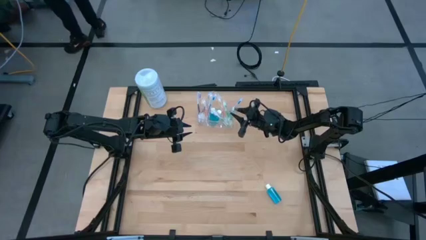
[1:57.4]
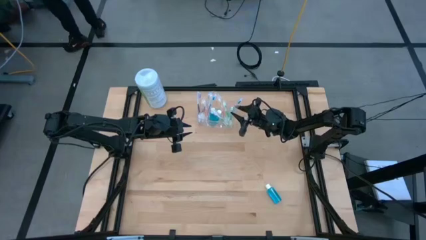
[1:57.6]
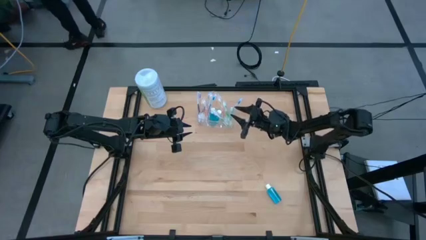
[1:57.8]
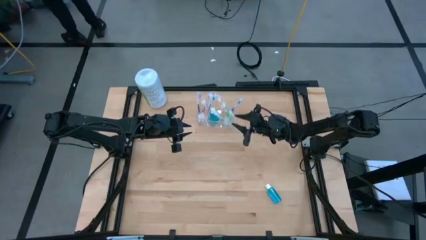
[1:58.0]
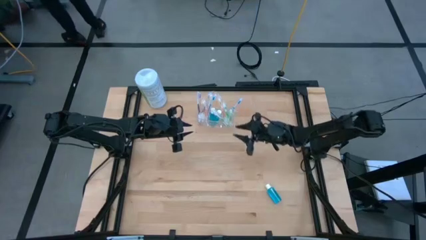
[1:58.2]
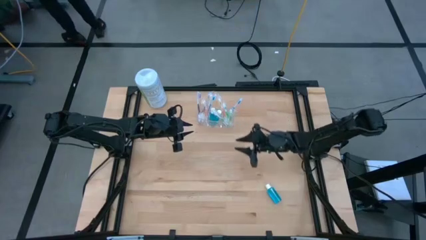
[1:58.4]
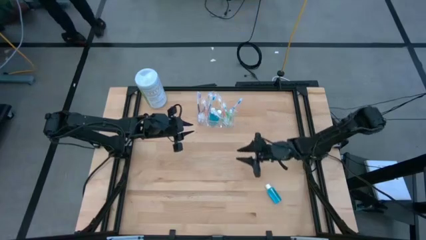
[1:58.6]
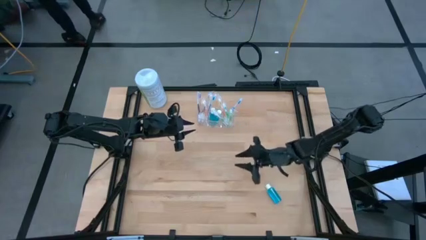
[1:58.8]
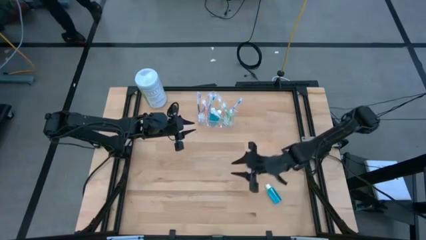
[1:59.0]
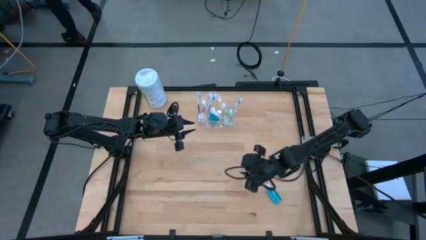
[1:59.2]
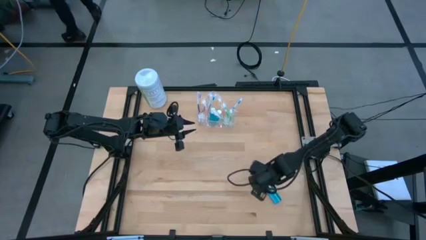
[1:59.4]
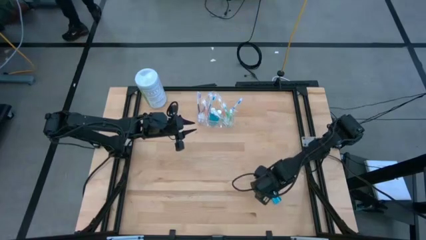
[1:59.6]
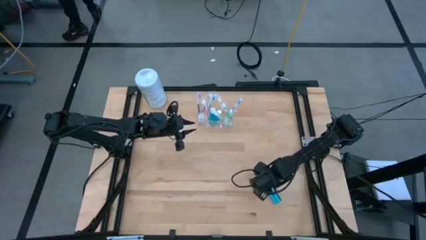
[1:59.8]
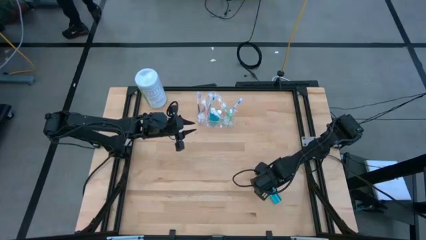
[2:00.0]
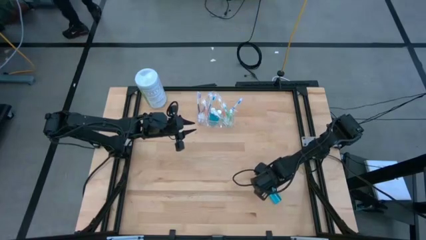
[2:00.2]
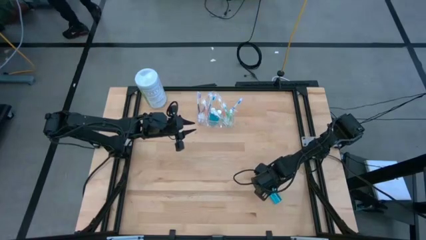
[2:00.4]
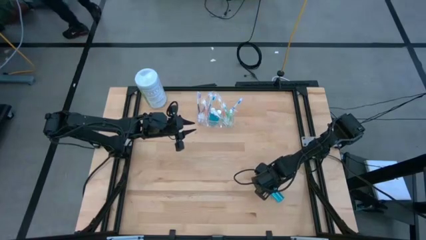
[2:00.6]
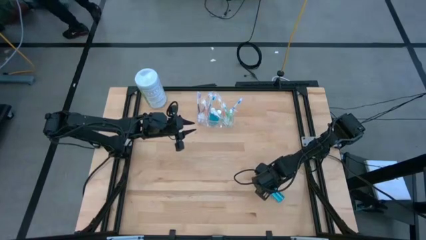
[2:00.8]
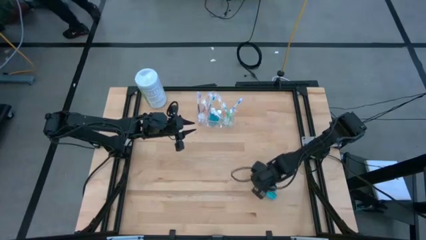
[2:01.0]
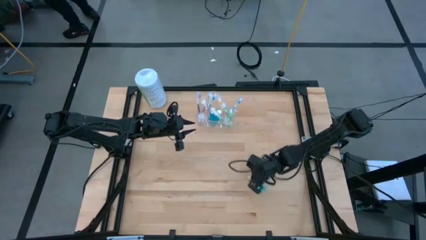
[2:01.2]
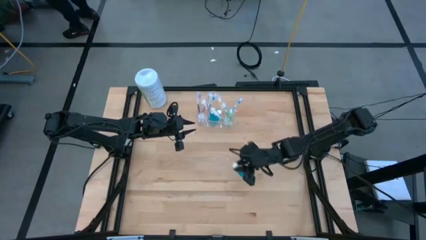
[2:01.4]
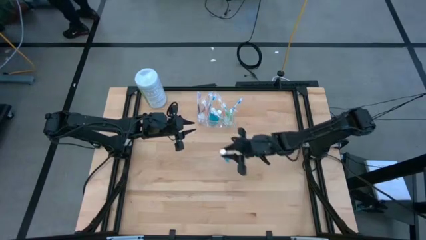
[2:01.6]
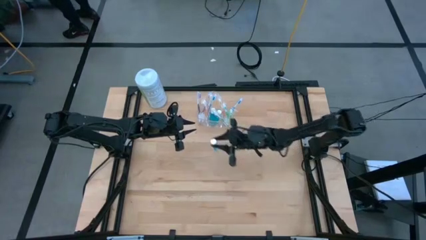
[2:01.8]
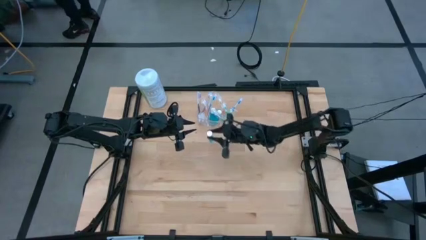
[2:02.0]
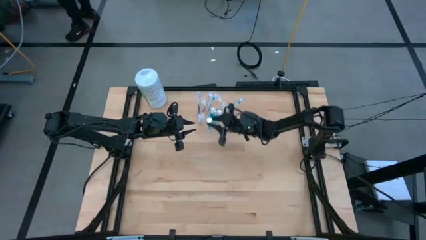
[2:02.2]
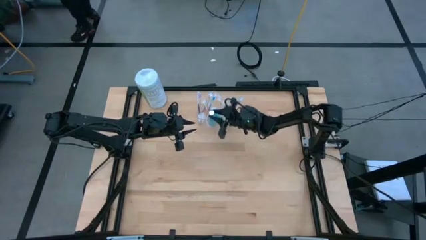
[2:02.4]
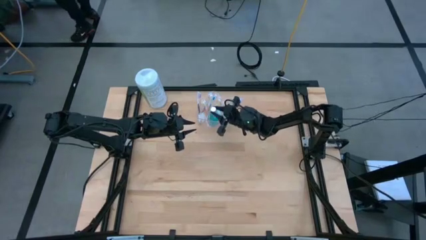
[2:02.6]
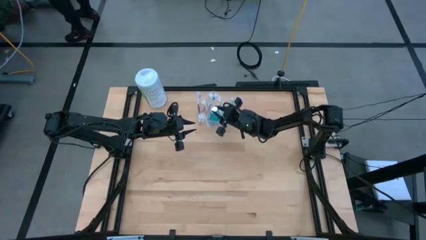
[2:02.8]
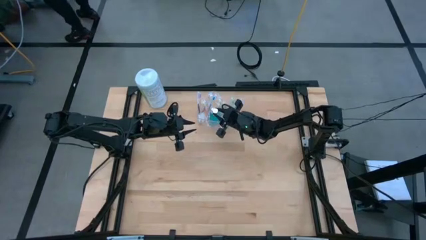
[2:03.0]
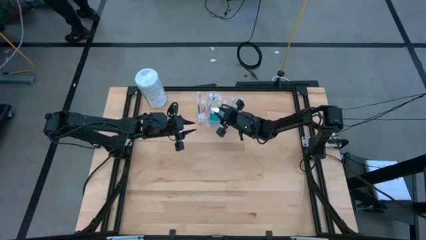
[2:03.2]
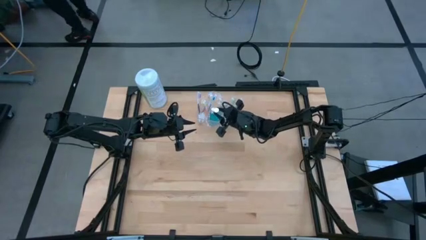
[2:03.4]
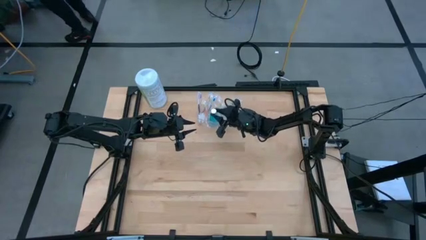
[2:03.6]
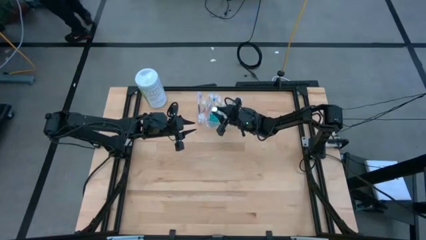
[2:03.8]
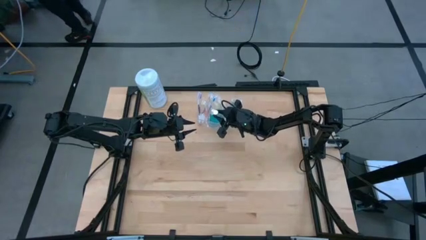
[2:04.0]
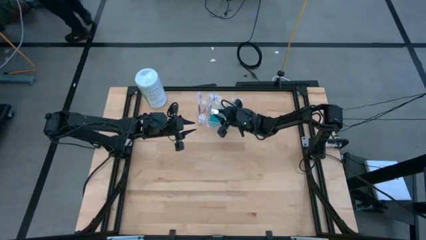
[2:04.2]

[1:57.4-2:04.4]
Task: Pick & Place toothbrushing station
Put the blue mouthwash bottle into the transparent organizer

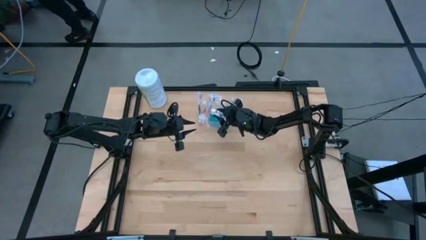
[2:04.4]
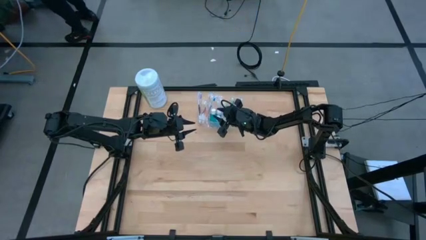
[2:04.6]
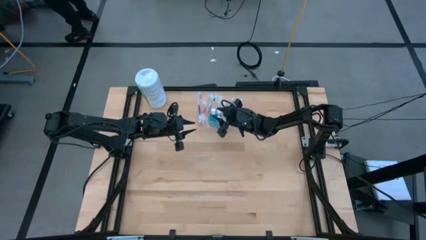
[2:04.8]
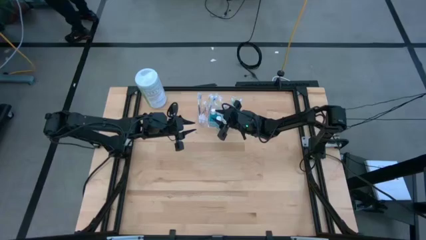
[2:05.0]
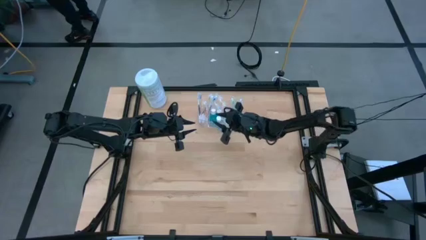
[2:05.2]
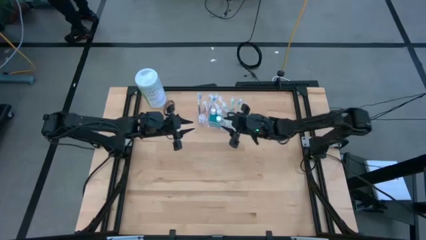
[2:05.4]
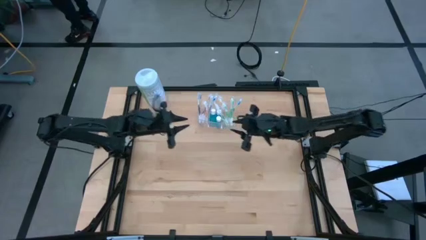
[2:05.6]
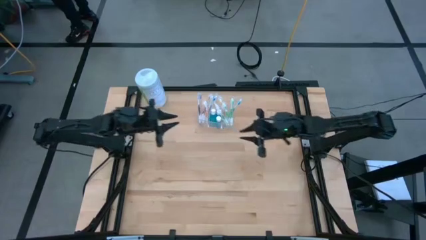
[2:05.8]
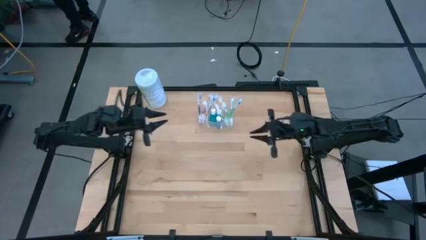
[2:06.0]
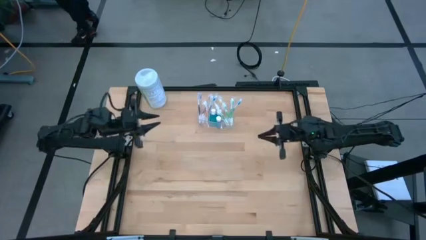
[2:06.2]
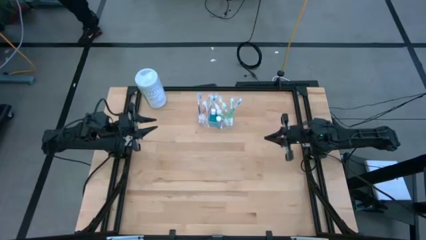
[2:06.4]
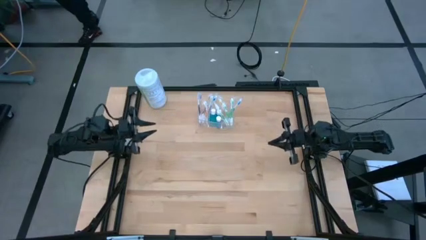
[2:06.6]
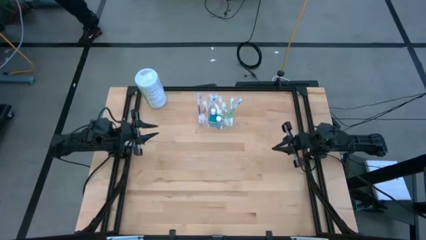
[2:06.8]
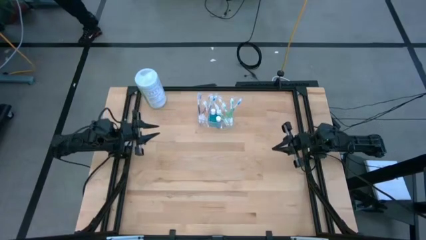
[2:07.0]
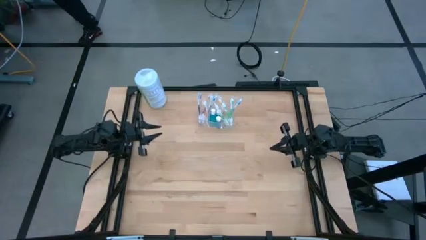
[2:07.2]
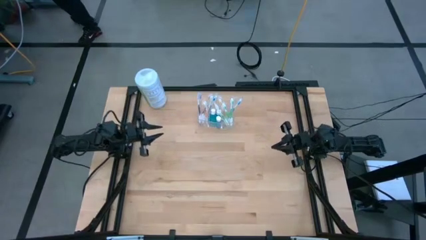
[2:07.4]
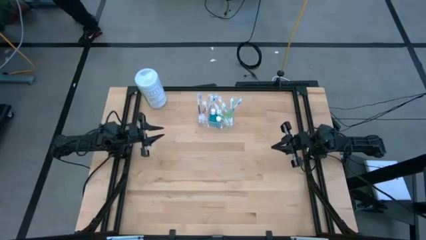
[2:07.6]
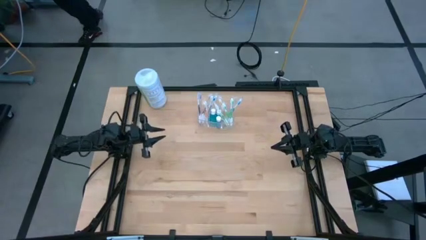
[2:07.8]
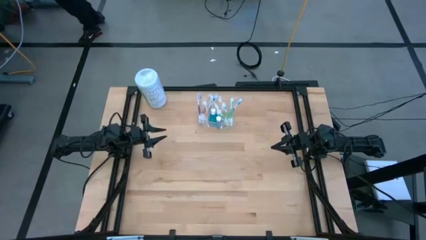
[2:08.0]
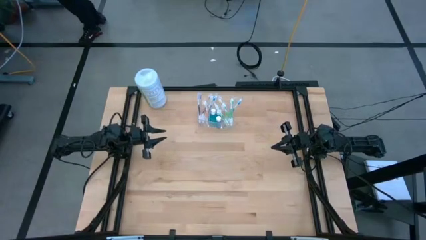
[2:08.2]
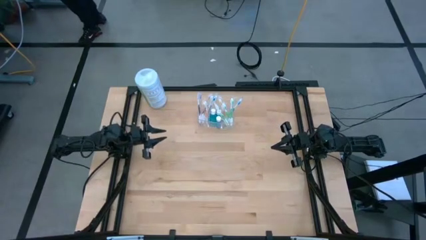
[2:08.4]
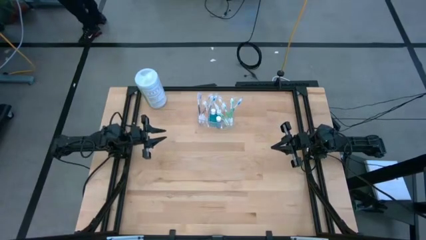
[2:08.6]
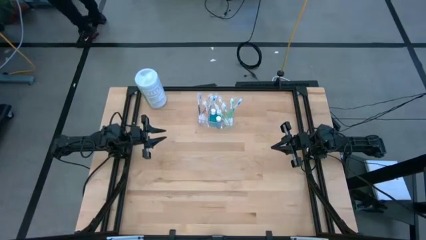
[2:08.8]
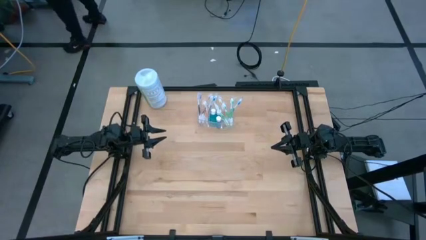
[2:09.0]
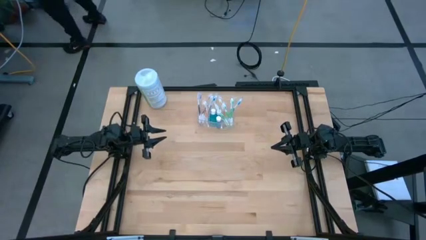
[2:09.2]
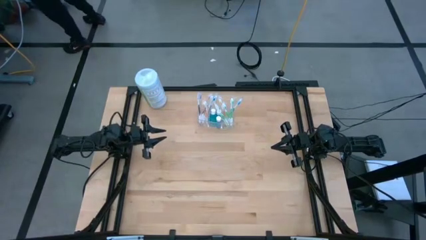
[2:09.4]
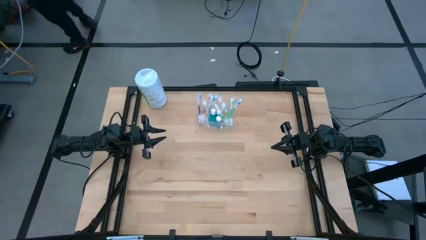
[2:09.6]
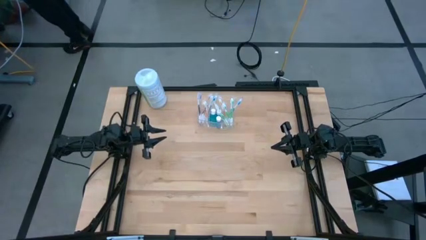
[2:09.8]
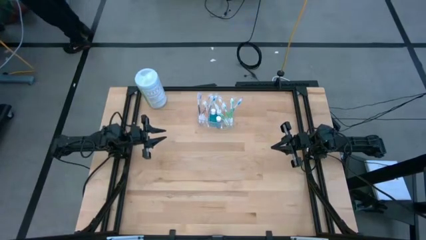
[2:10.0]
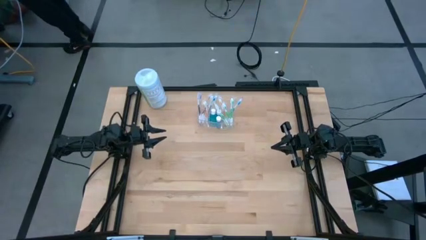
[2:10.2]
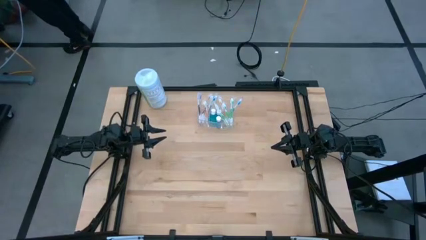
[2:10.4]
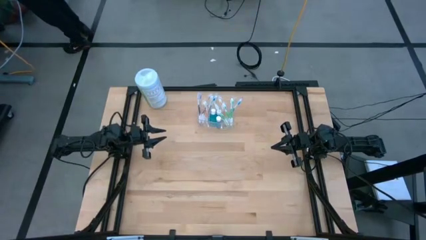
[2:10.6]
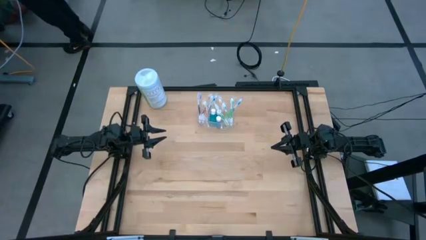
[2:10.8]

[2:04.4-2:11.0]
Return to Home Position

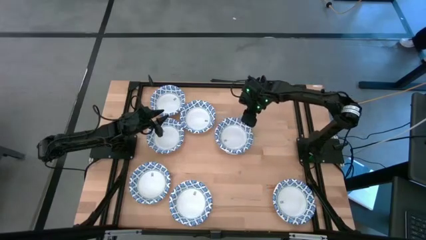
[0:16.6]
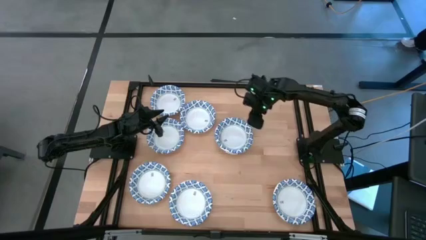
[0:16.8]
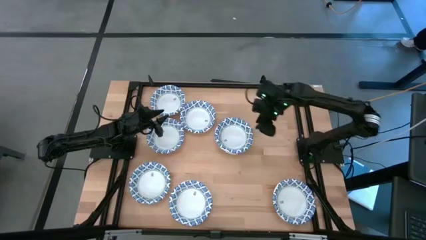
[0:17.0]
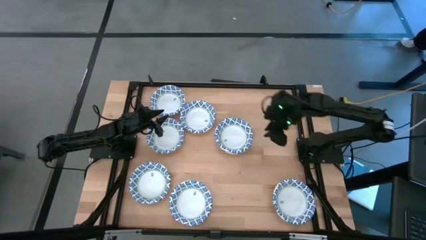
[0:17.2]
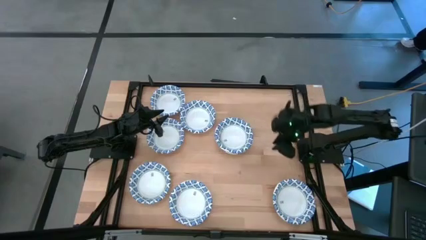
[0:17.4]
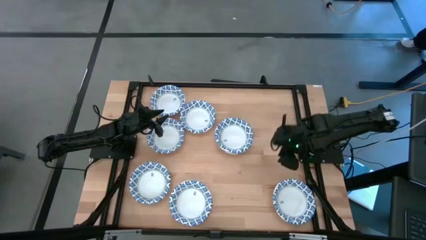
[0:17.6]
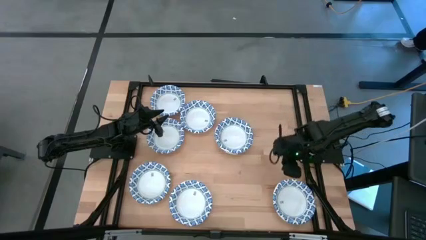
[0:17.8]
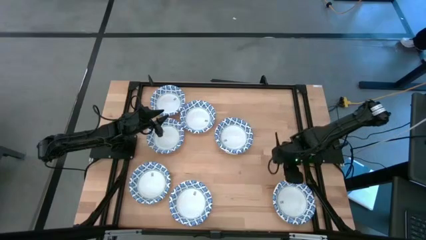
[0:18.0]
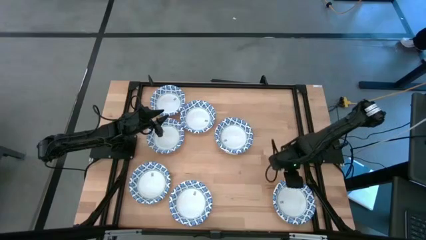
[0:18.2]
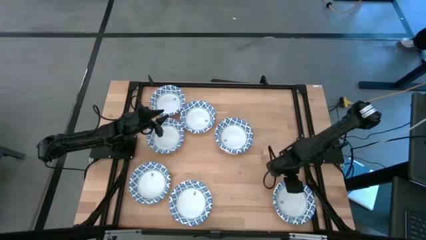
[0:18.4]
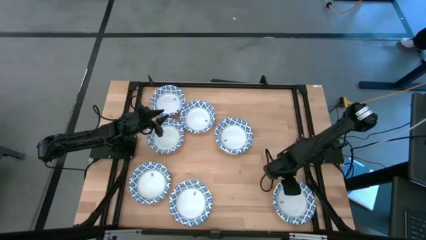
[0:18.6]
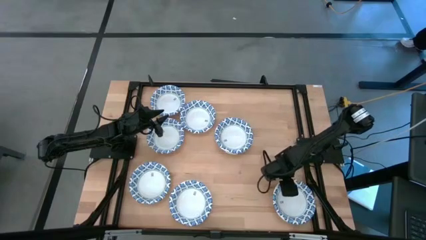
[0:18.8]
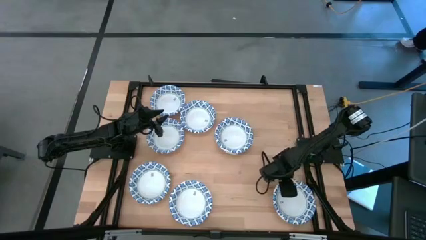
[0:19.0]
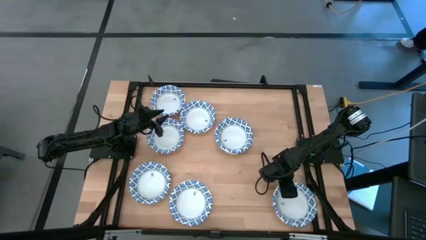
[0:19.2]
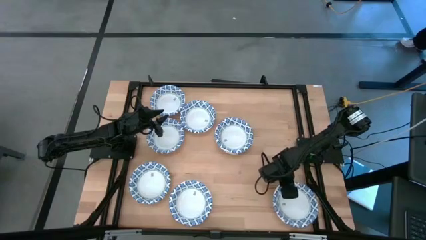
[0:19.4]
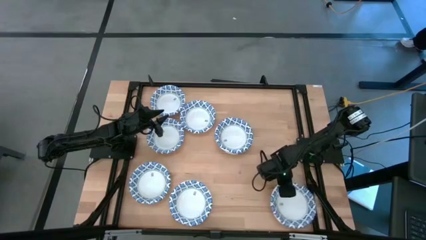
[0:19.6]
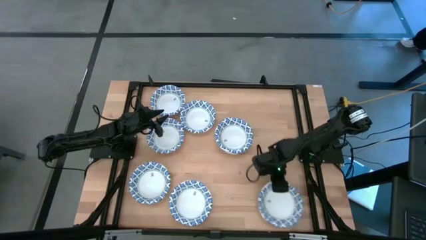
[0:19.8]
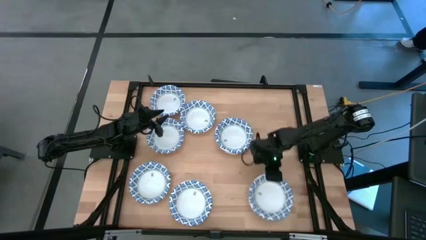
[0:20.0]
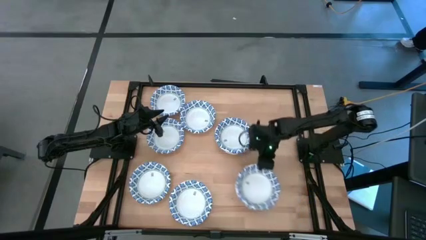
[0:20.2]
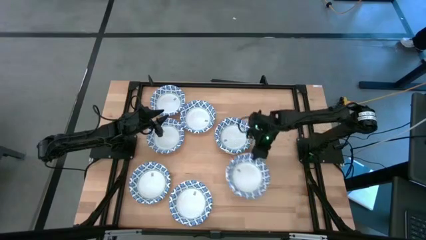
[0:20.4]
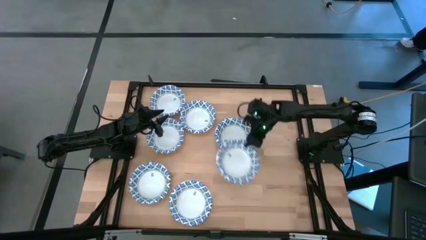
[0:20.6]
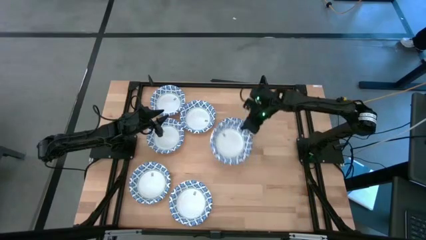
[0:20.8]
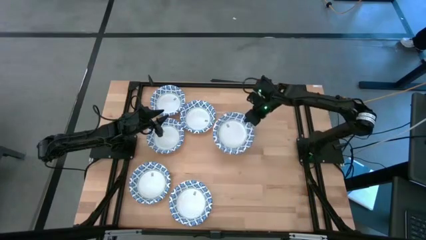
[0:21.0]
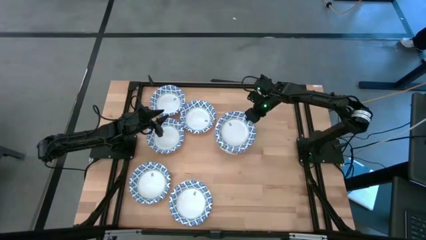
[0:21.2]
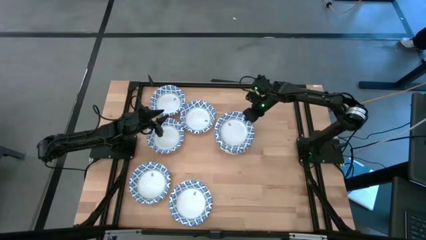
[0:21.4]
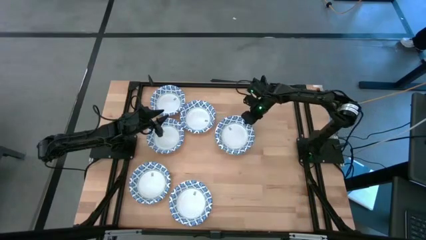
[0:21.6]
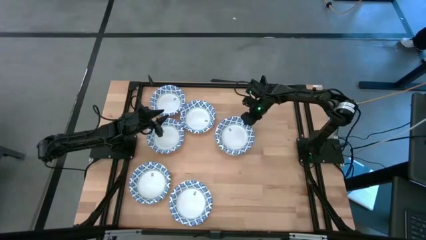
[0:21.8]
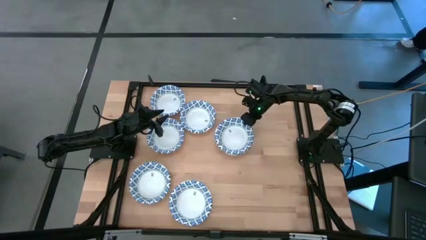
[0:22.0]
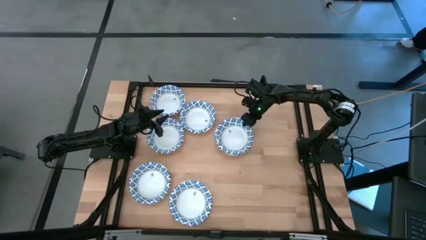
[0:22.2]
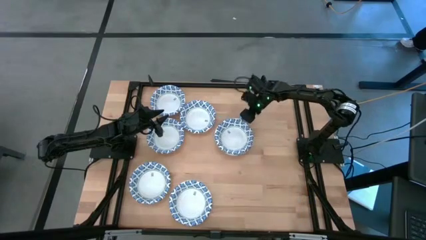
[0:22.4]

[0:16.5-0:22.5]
Task: Nest bowls inside each other
Stack the blue patterned bowl on top of the other blue patterned bowl
